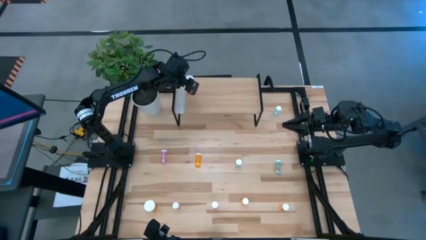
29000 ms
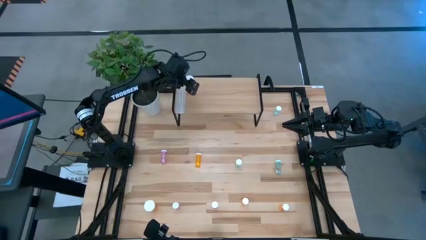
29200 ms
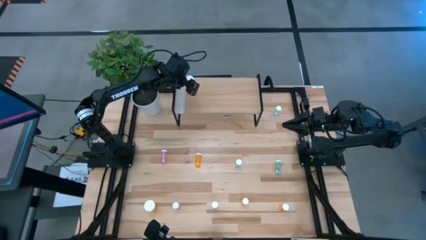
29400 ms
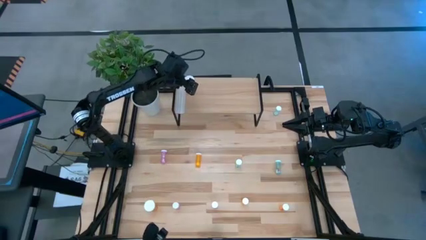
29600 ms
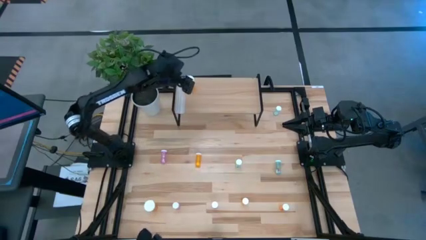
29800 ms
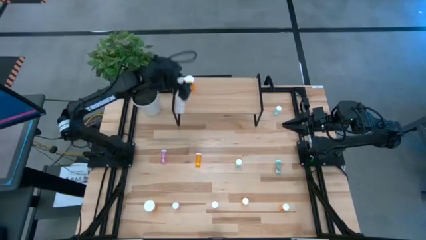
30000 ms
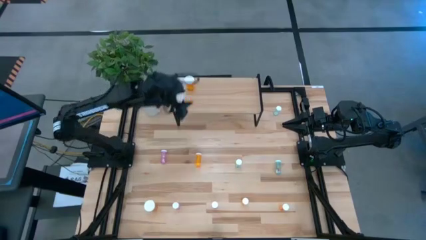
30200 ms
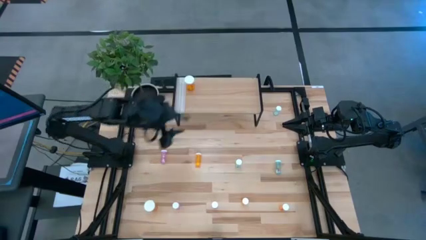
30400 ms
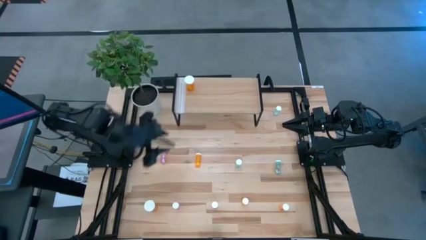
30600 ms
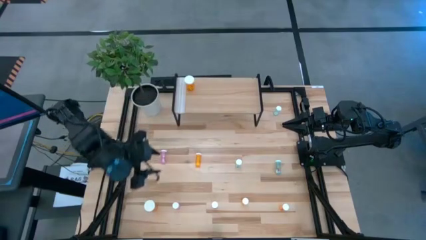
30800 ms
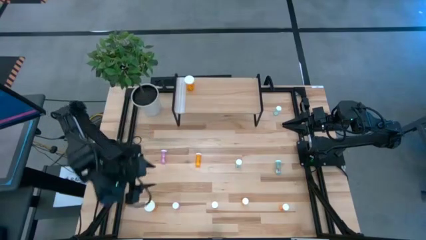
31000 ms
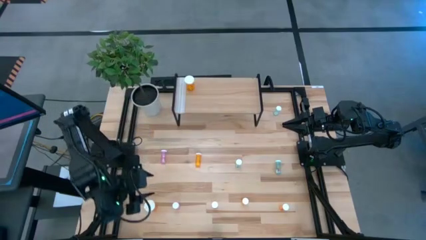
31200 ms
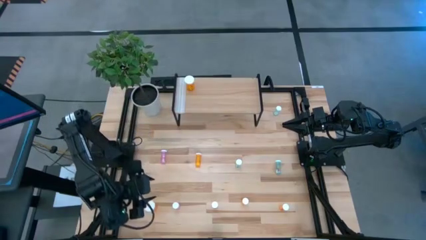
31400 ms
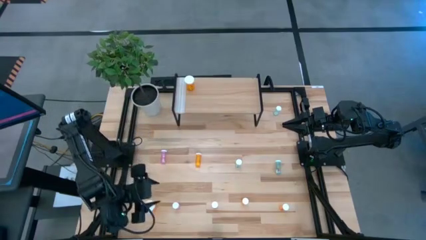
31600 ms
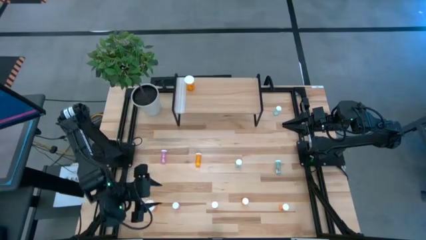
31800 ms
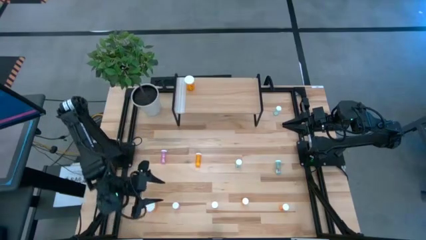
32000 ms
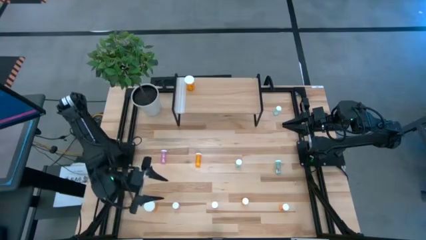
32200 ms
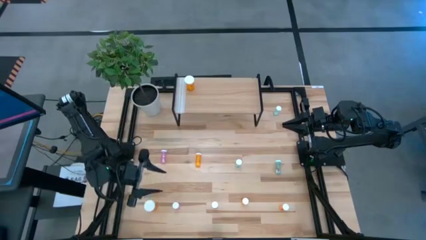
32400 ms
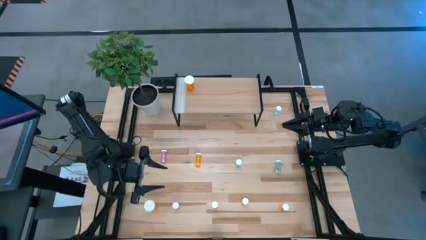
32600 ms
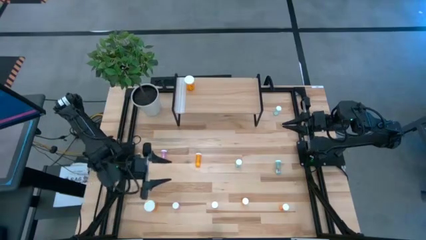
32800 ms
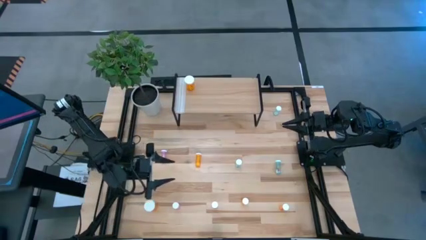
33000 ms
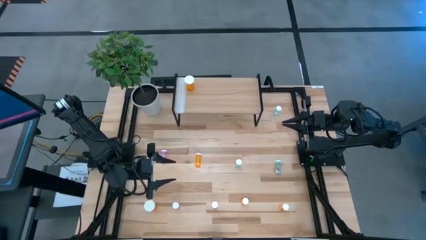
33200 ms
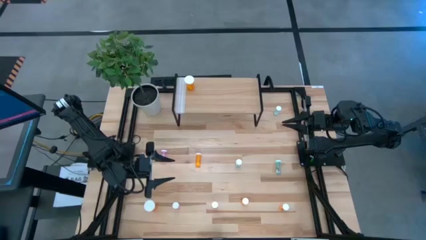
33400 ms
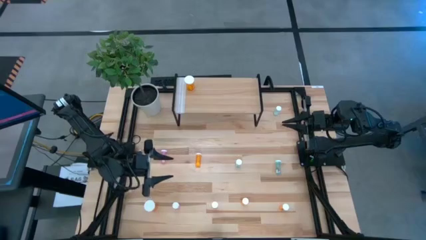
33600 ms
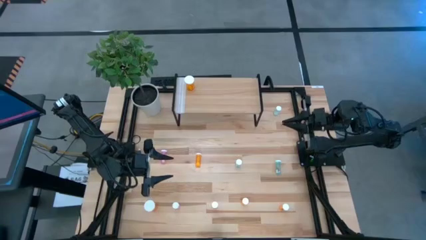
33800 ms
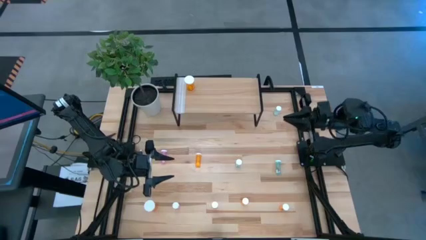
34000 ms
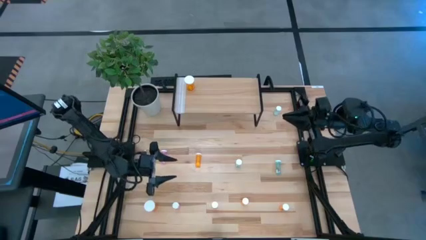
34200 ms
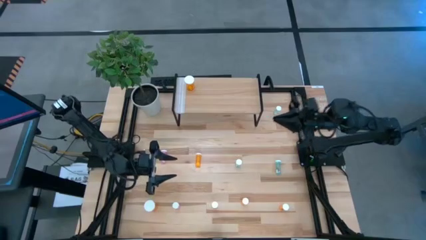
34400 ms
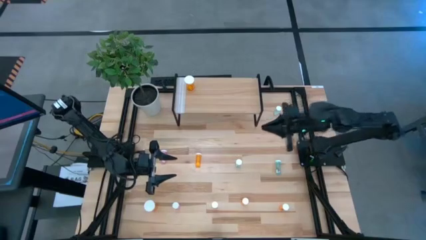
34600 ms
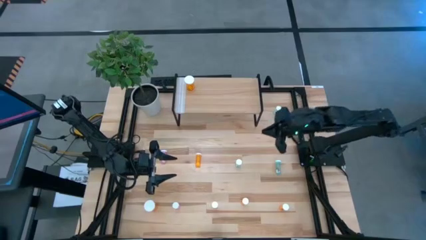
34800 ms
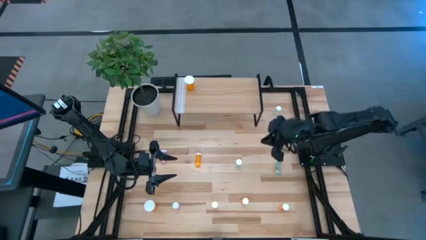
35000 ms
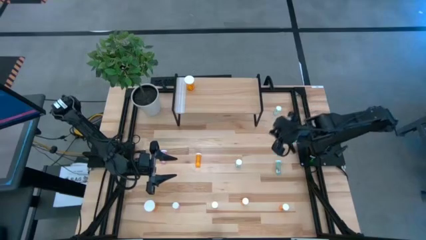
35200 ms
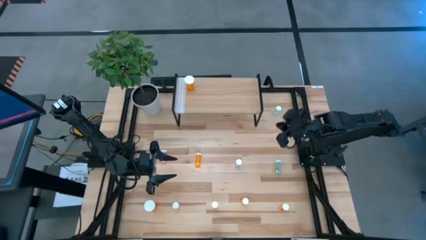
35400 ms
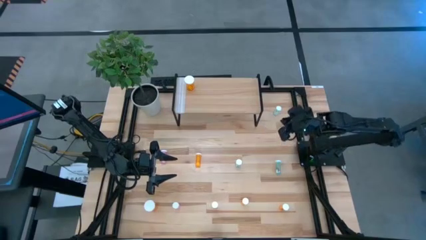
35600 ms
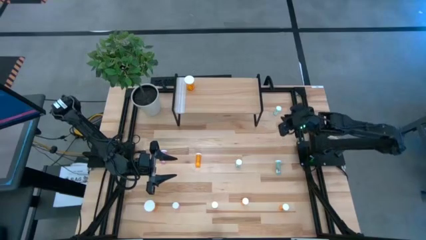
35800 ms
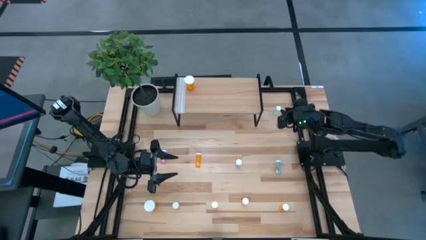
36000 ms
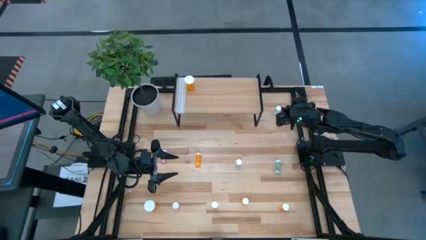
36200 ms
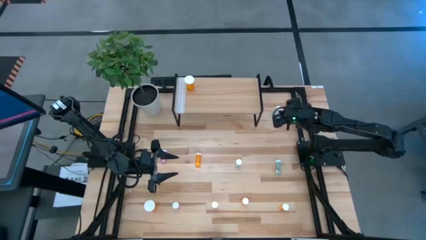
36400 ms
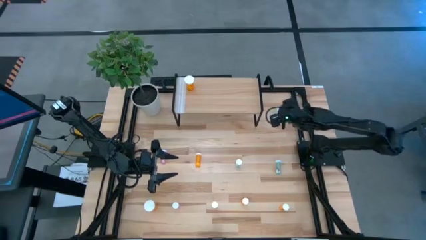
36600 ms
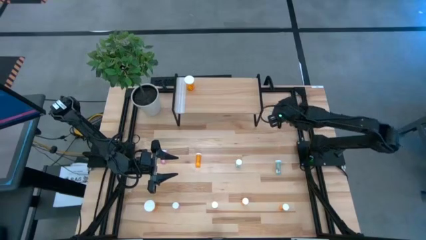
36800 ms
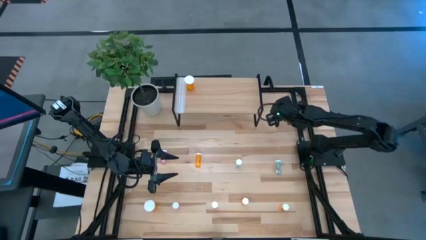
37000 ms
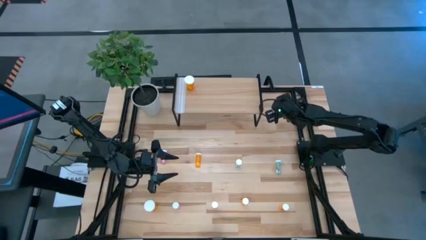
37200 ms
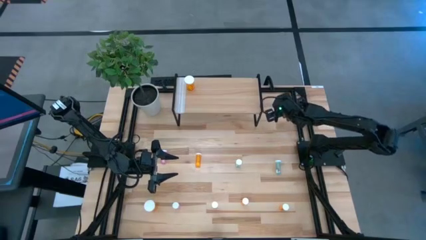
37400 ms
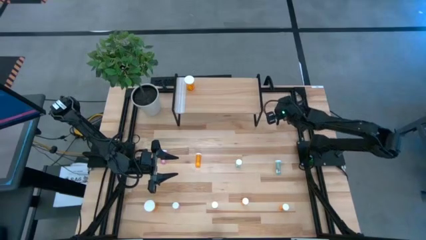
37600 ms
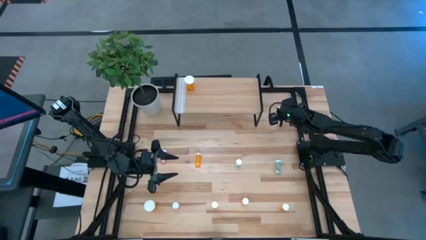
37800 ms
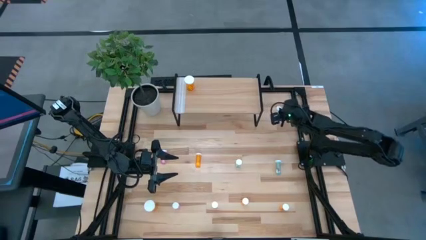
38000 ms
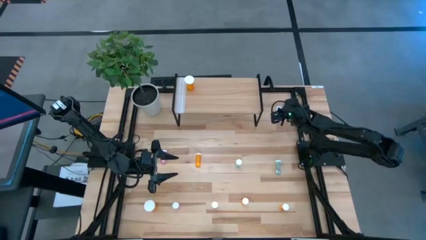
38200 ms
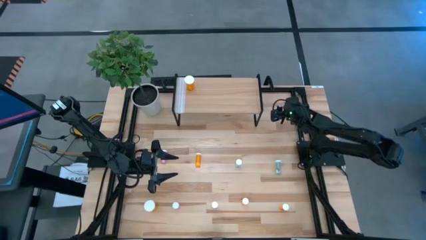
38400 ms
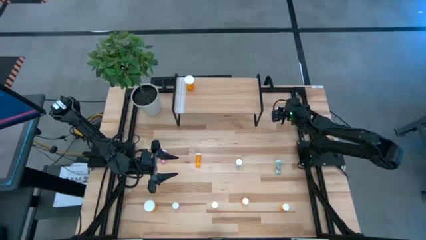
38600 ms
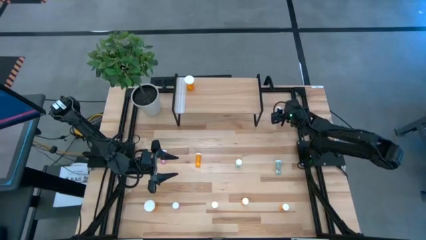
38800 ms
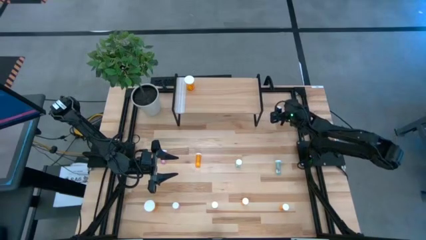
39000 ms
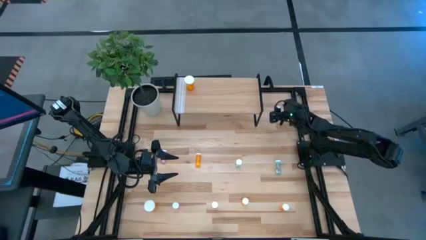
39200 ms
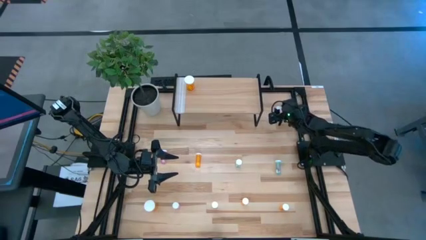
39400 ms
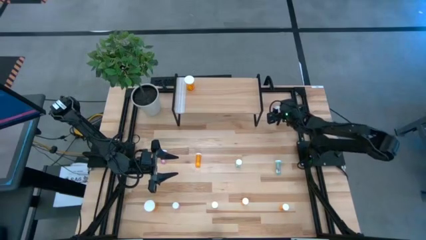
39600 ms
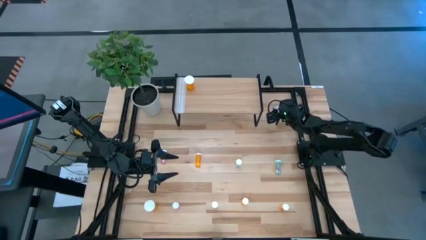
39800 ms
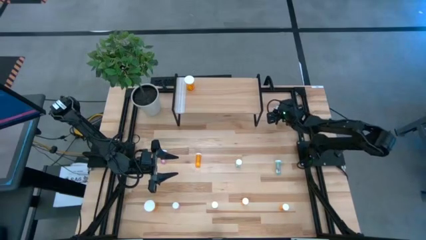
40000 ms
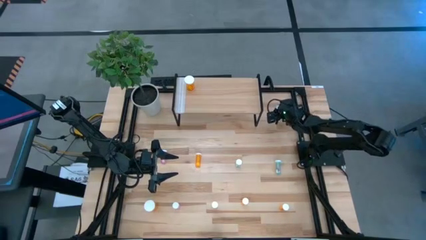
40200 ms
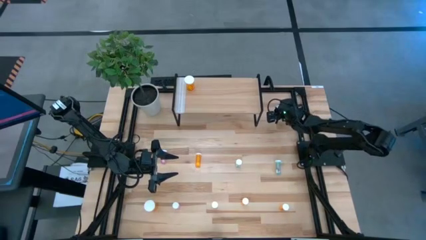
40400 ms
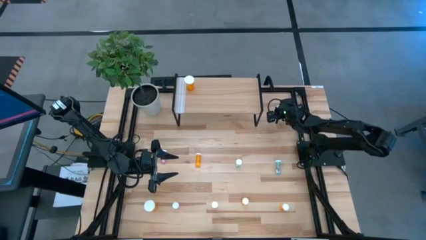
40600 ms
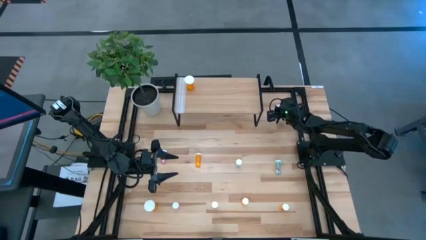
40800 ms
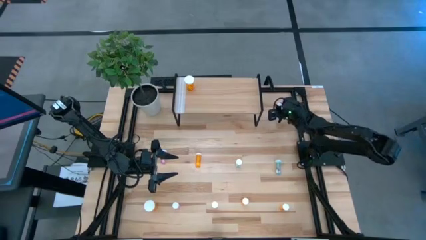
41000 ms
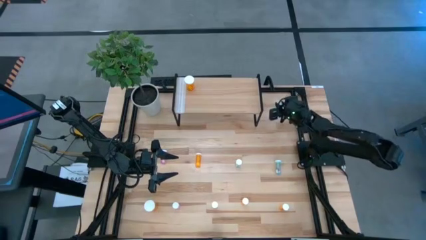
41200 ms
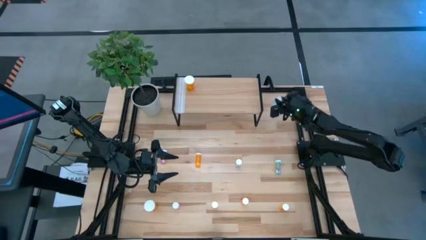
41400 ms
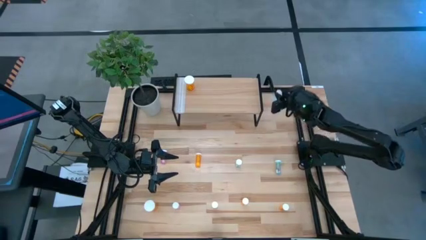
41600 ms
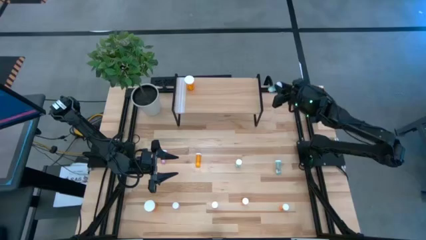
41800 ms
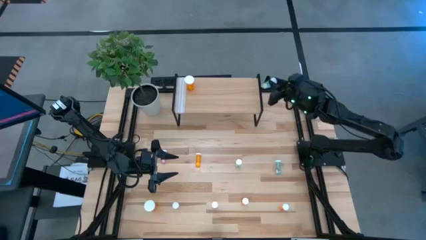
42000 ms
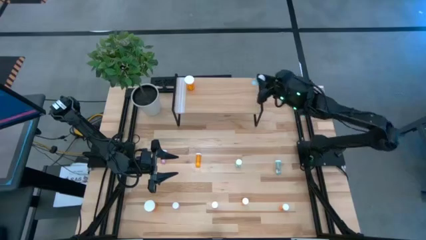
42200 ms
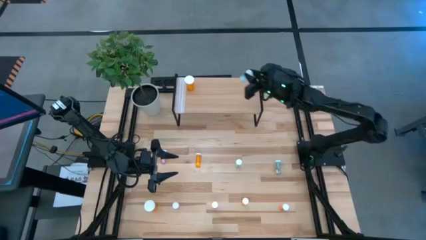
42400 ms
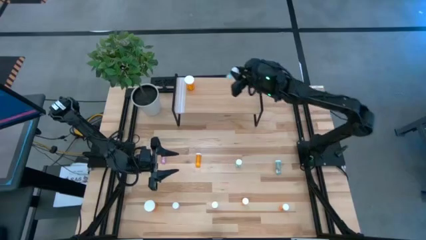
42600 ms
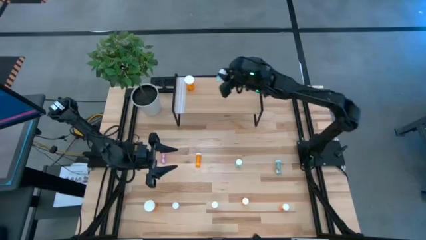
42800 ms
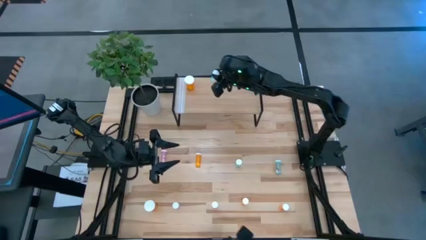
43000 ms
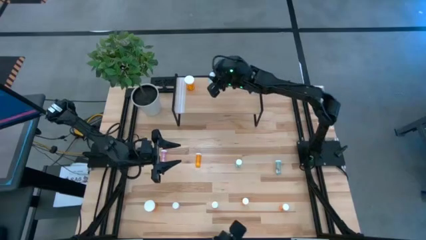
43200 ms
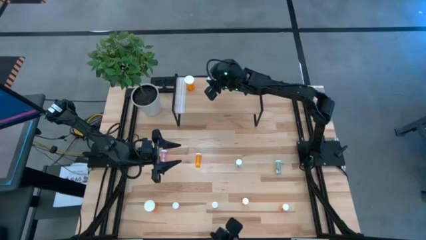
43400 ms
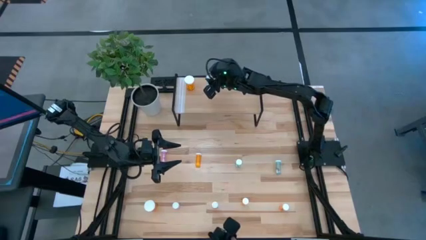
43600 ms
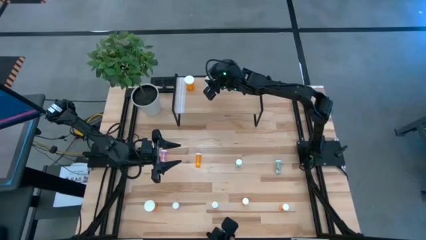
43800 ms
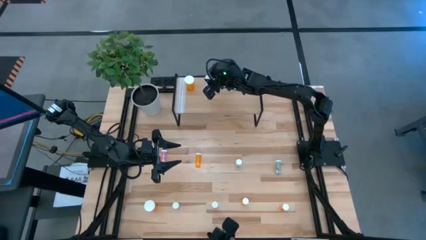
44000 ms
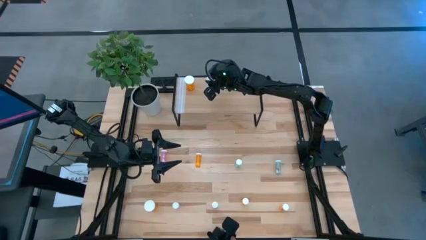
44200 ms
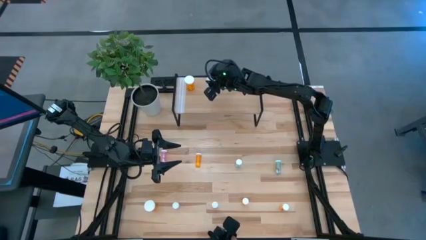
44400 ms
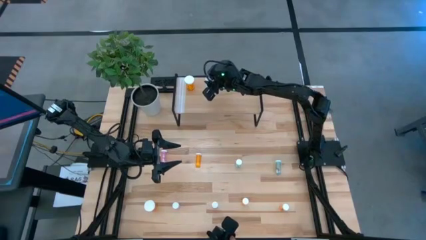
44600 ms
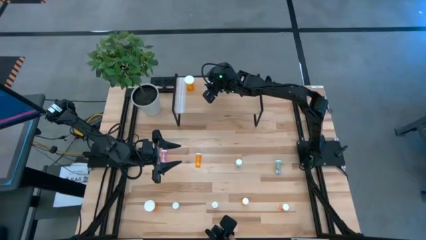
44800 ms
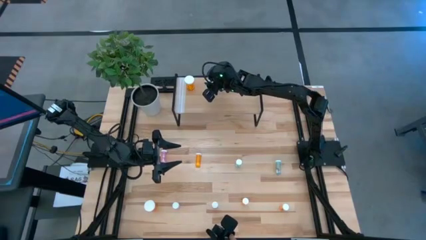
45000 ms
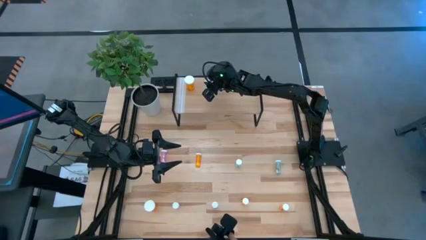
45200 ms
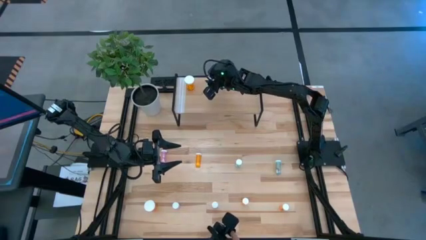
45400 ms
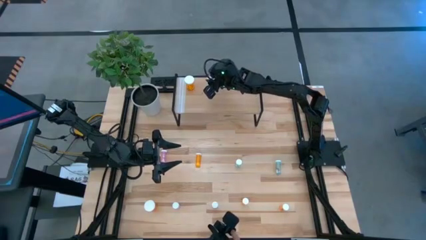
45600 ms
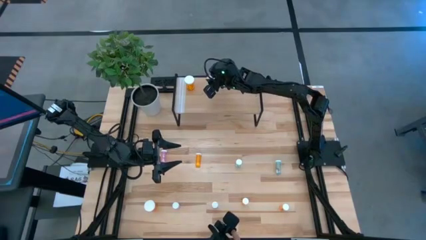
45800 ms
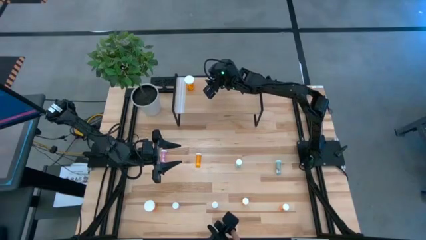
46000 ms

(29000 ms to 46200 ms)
Task: Pick and place medicine bottles onto shelf by color
Put the top right green pill bottle on the shelf
